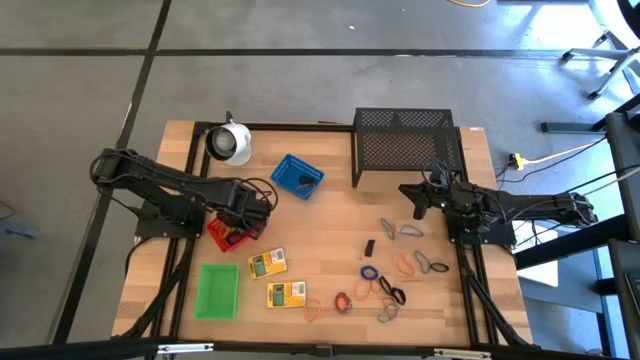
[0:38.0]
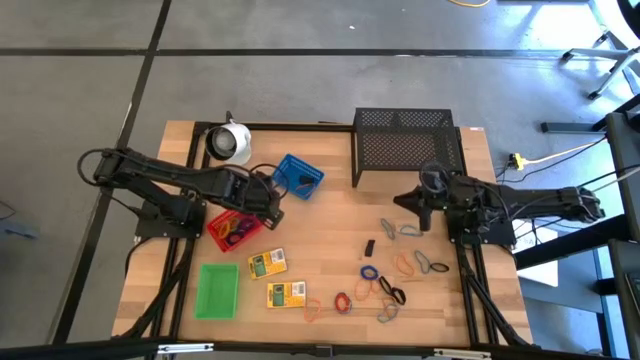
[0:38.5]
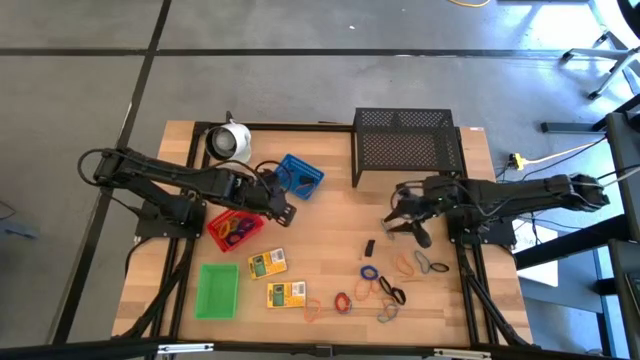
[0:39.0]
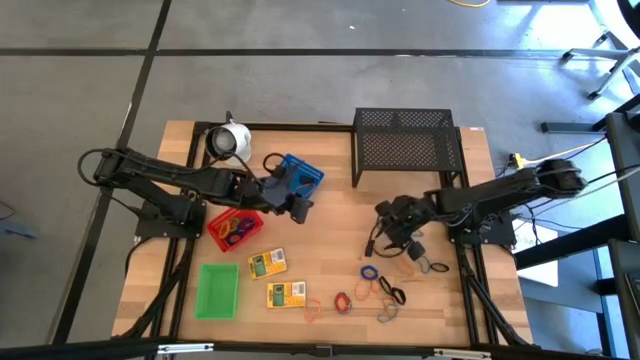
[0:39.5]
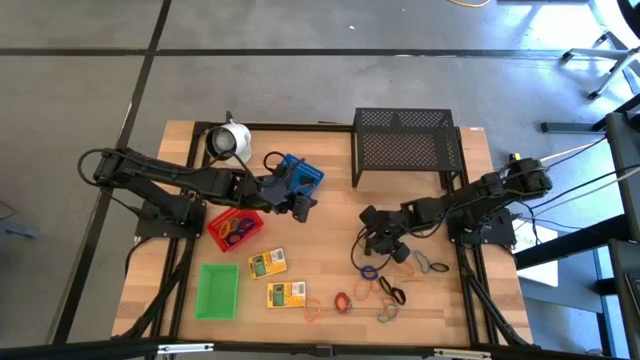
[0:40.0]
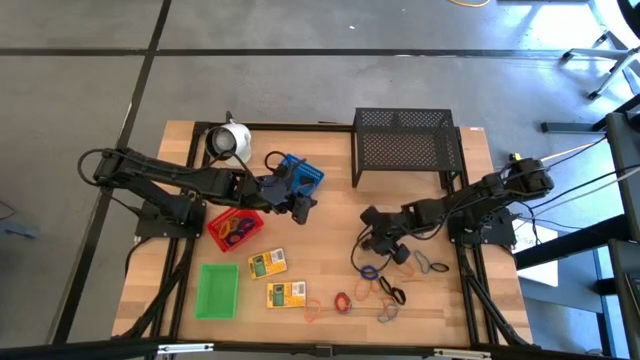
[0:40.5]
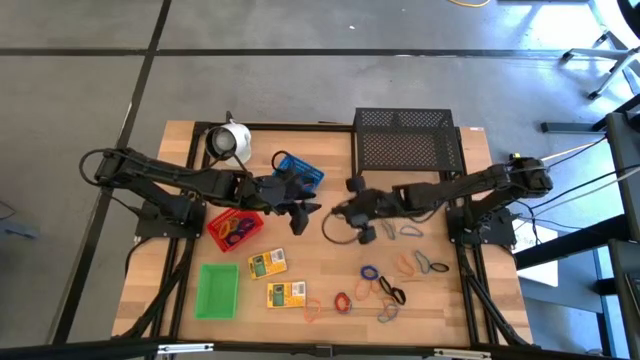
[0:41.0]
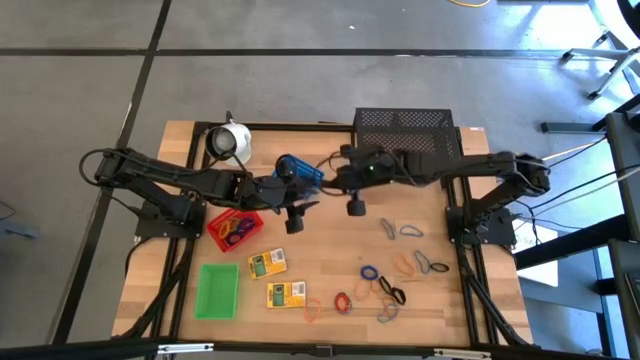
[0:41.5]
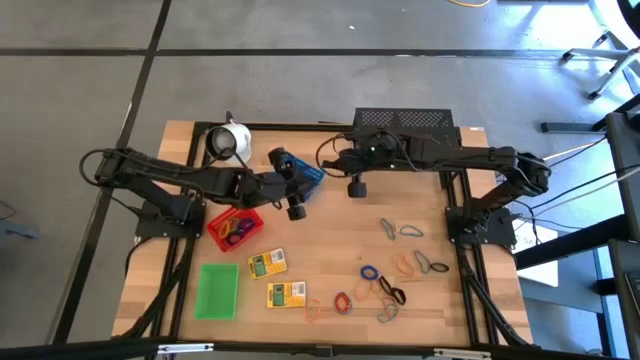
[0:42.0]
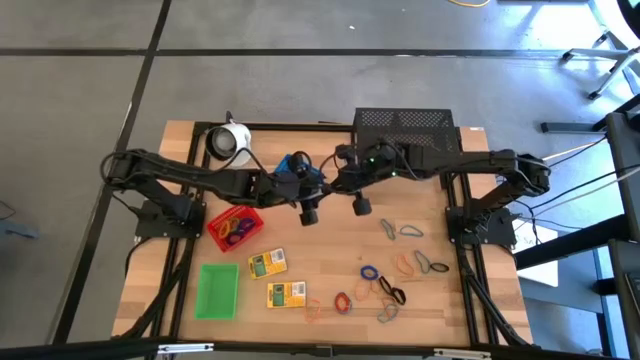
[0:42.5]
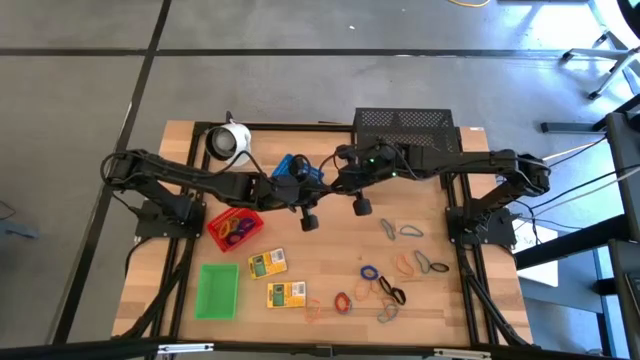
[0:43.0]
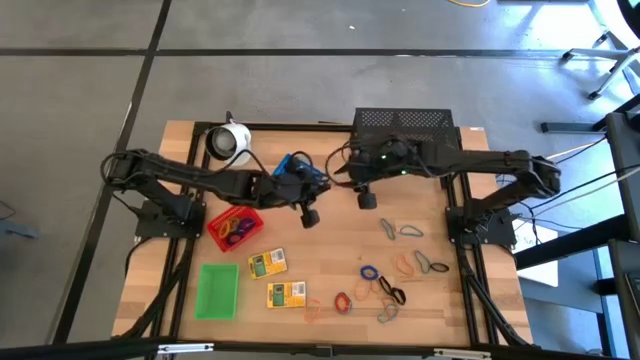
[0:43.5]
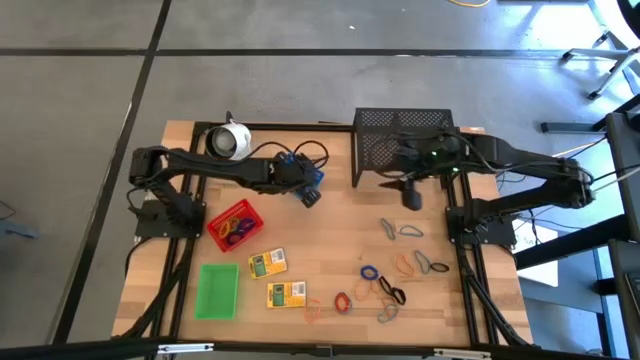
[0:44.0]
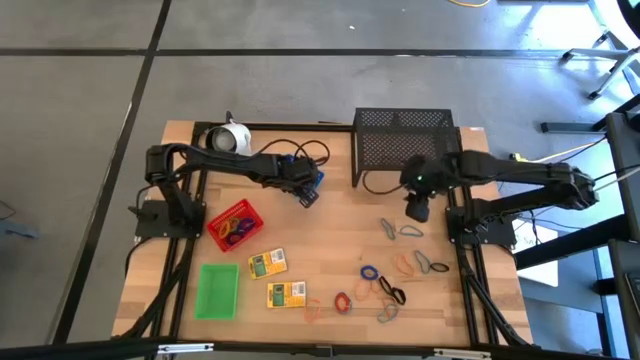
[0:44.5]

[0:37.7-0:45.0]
Task: Pick & Place Office Desk Supplies
Put the black rubber band into the blue bin

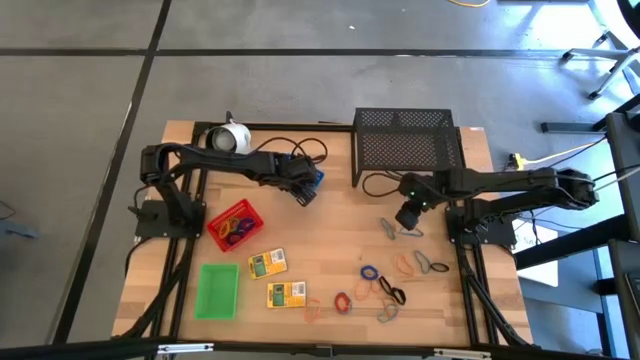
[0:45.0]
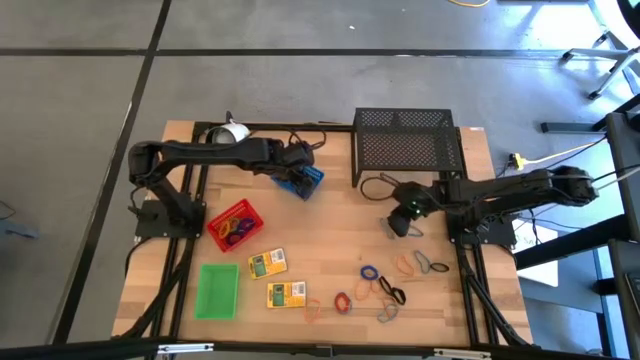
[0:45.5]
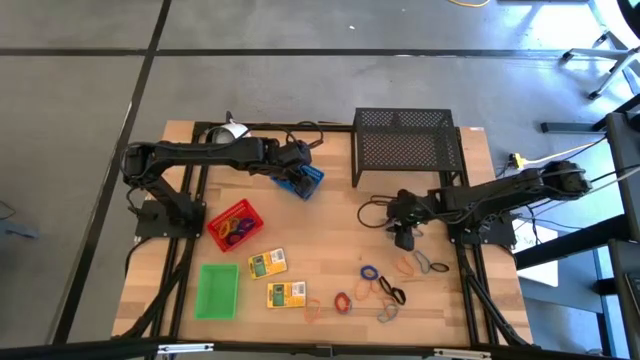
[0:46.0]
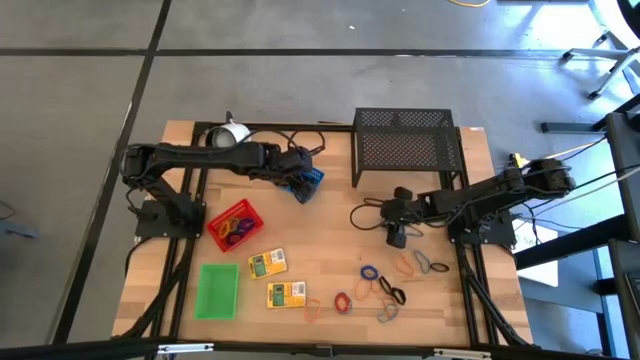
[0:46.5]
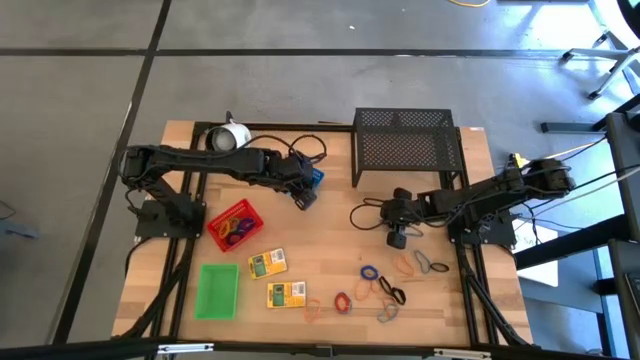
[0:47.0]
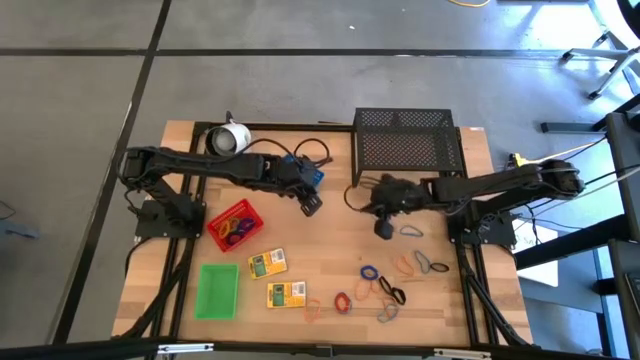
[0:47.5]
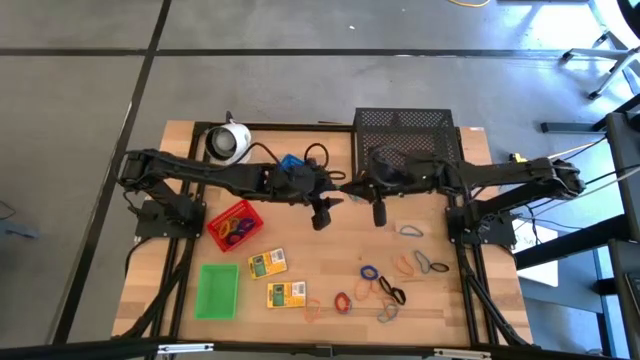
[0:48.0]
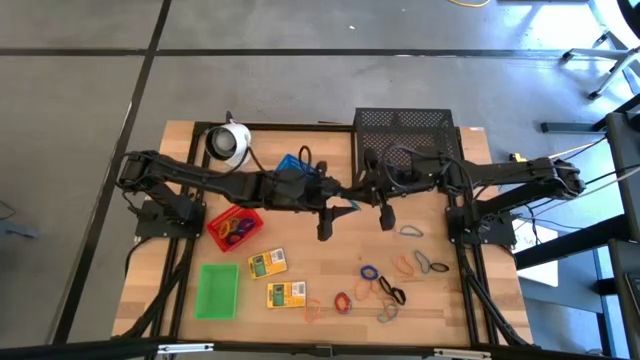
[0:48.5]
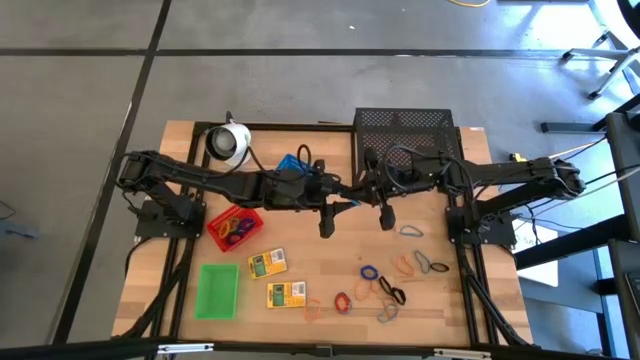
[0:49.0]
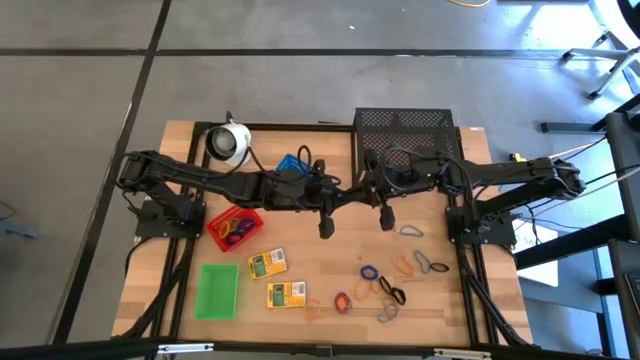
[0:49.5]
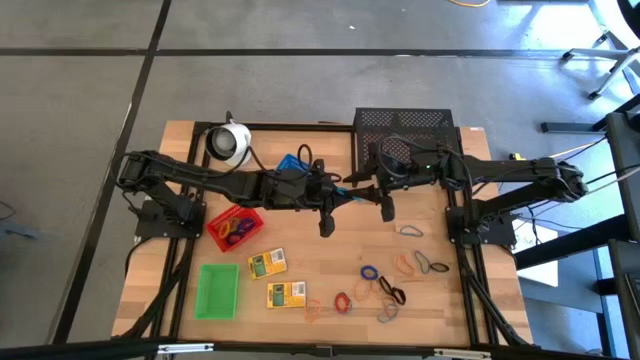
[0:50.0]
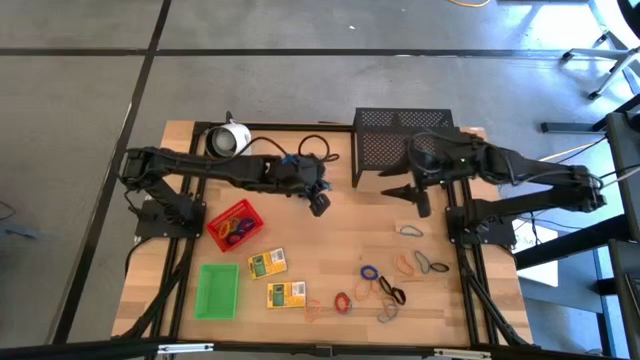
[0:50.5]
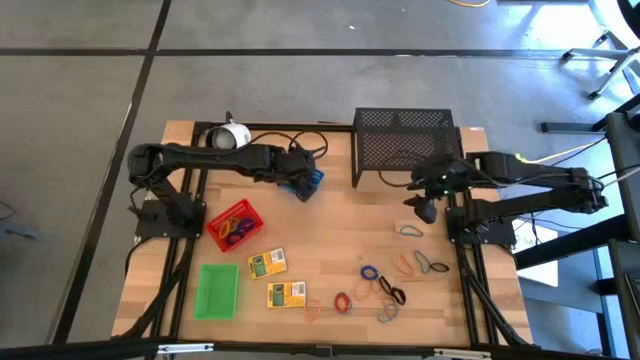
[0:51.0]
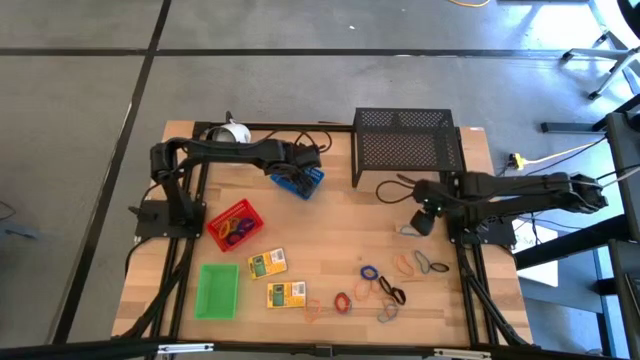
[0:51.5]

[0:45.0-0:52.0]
Put the blue rubber band into the blue bin

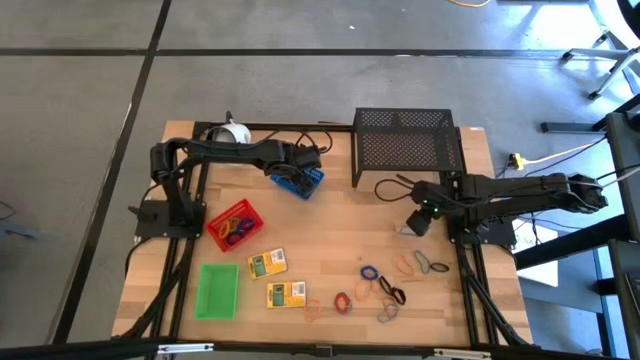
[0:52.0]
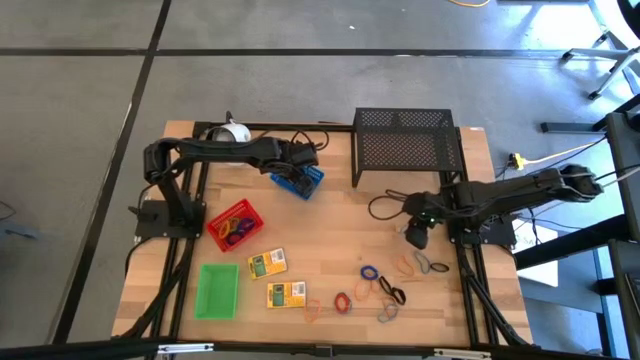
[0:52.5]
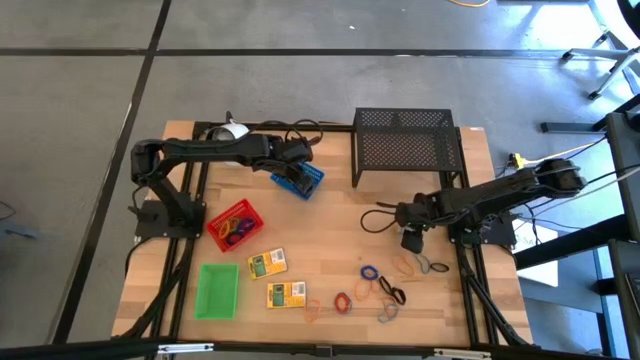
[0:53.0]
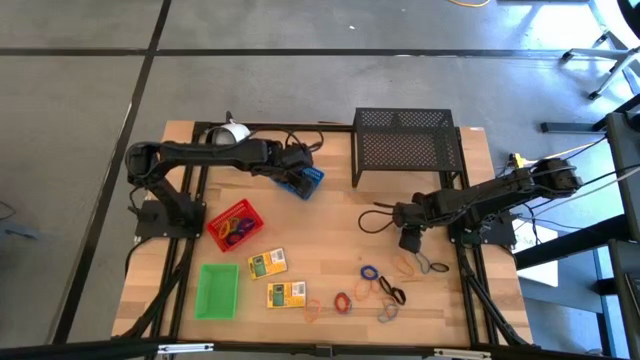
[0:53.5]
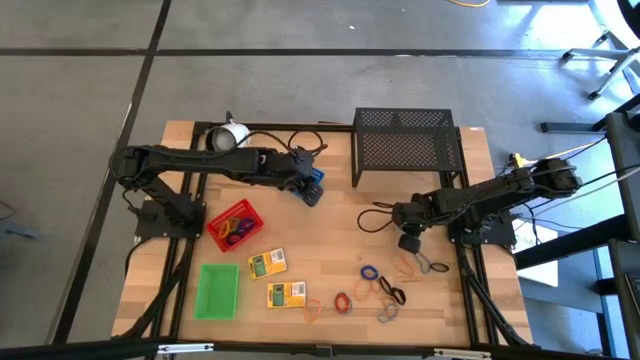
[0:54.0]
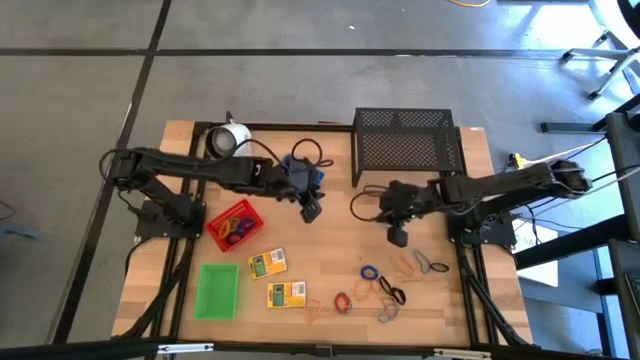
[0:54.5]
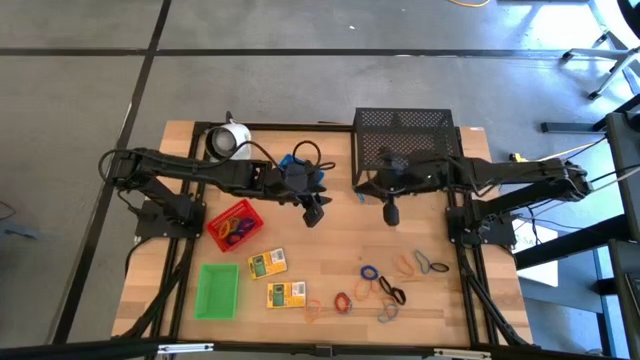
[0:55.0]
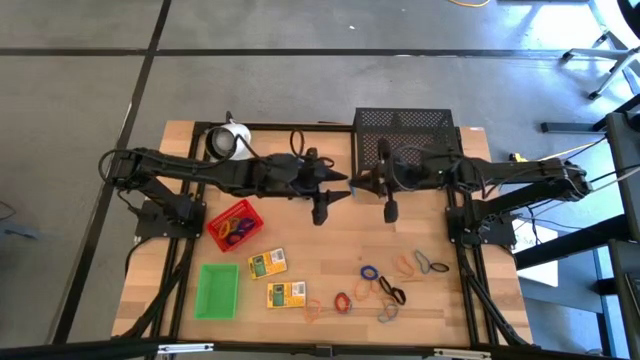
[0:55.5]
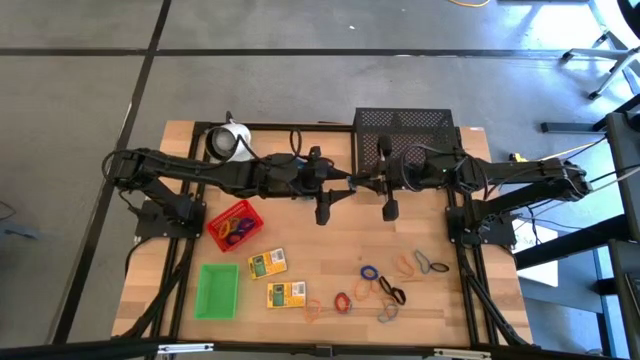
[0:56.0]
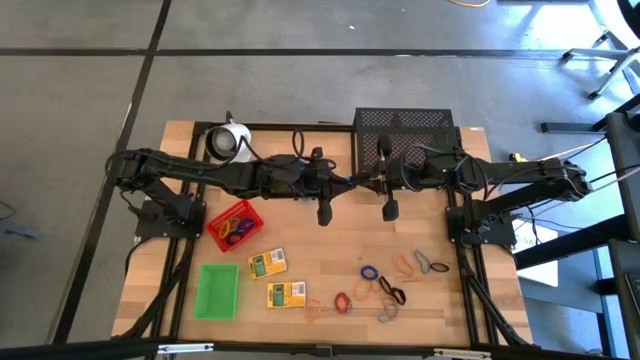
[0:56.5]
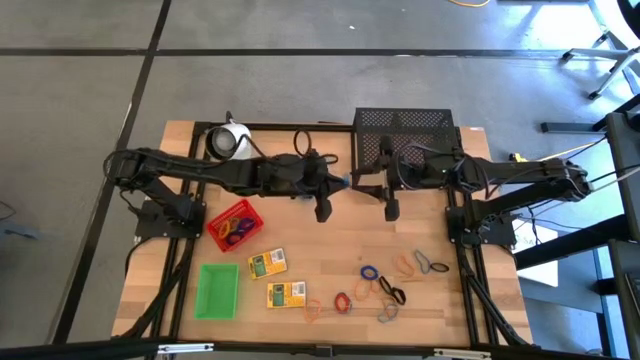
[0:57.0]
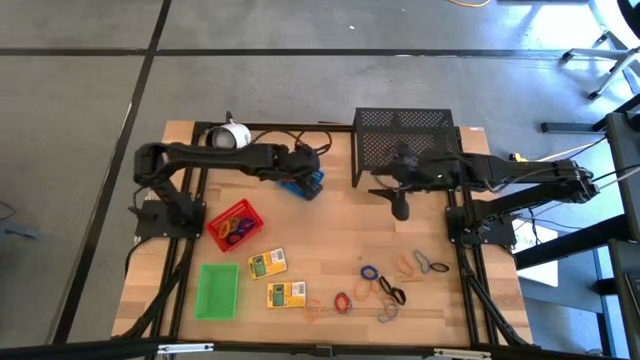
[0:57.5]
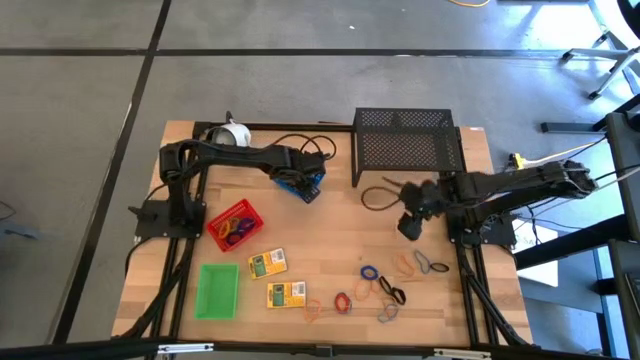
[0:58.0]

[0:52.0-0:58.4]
Put the blue rubber band into the blue bin

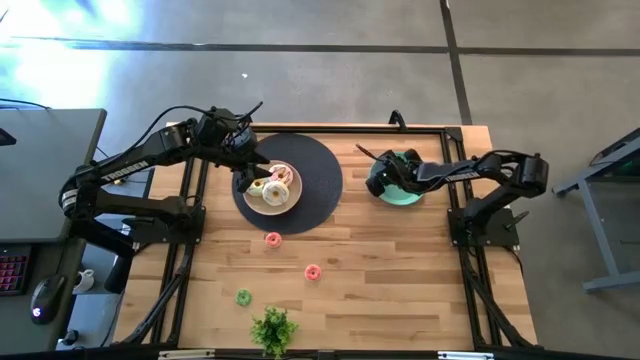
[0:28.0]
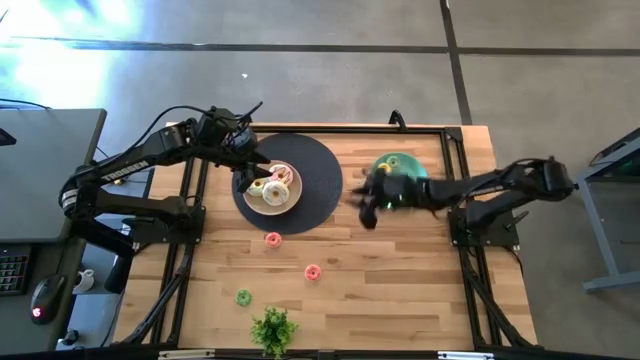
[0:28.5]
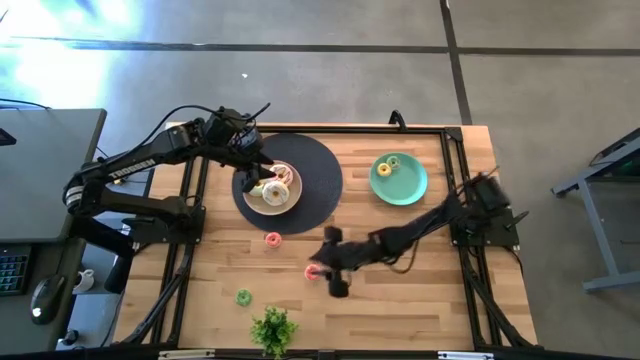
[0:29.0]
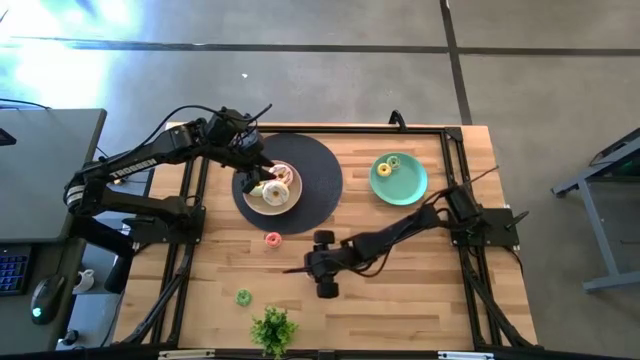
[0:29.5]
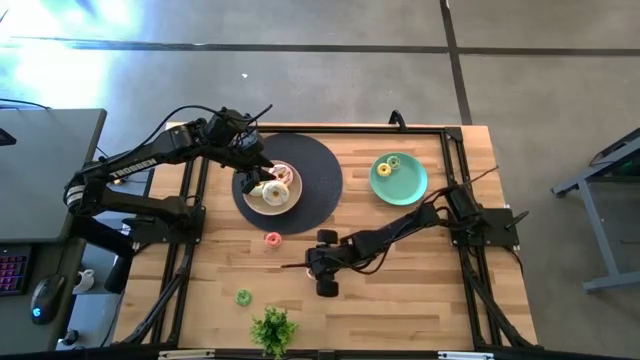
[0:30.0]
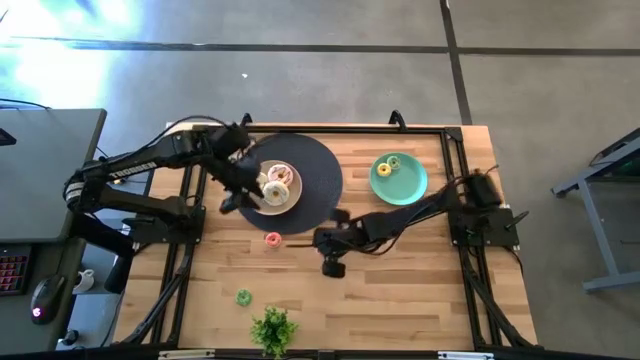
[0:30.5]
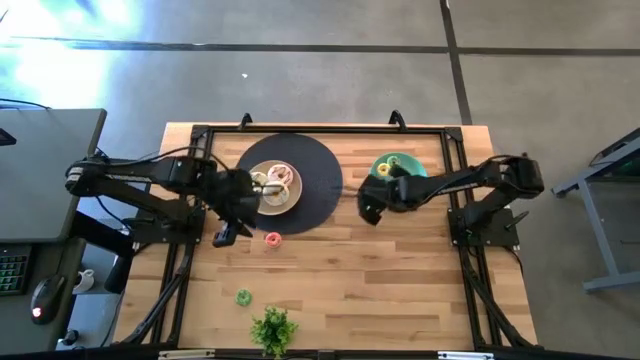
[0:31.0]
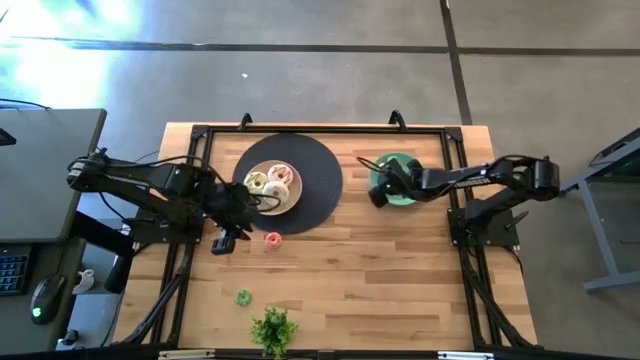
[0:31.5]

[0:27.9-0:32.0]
Task: Pick & Place donuts
Put the bottom small pink donut on the green plate
